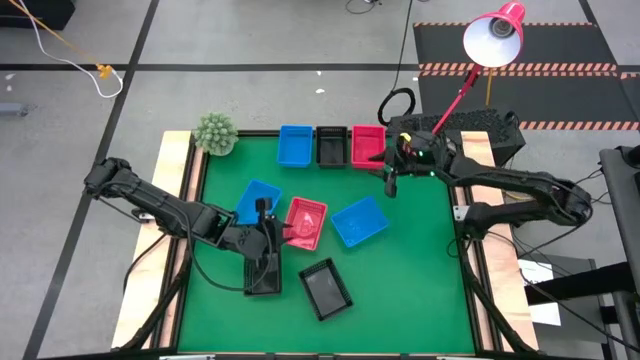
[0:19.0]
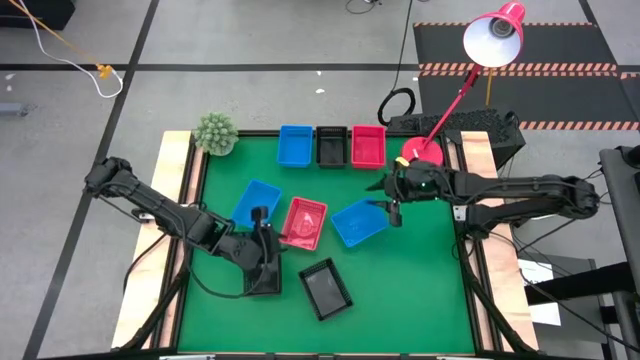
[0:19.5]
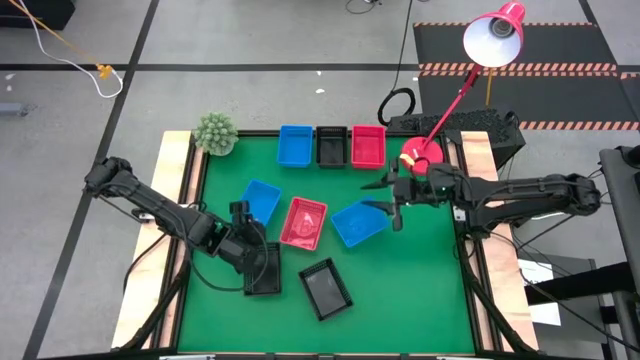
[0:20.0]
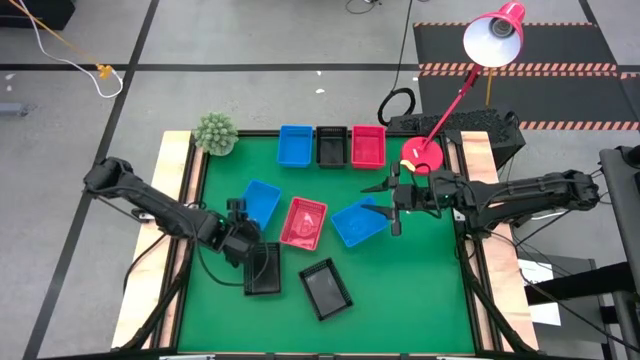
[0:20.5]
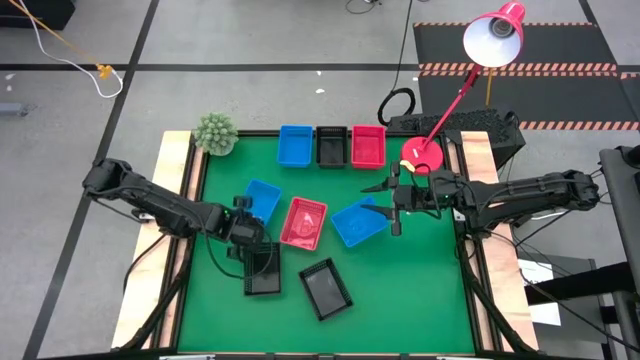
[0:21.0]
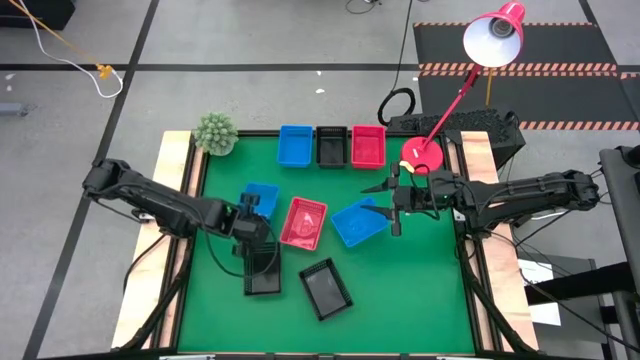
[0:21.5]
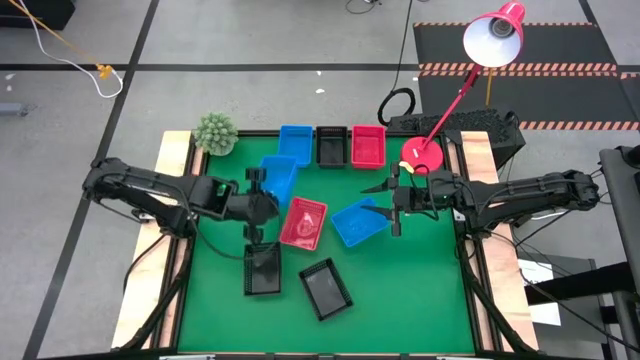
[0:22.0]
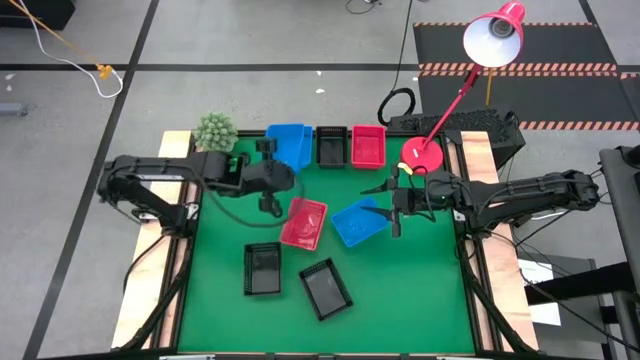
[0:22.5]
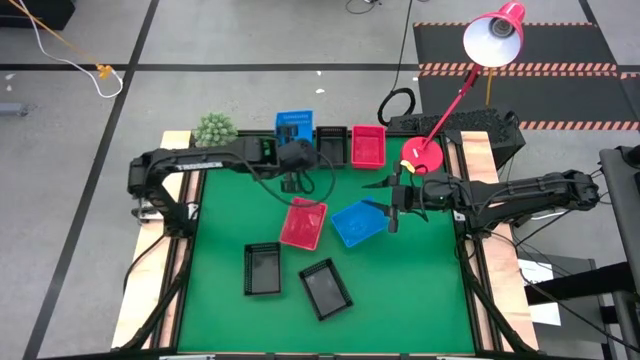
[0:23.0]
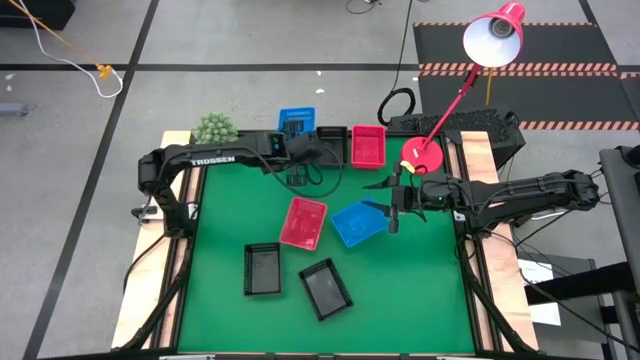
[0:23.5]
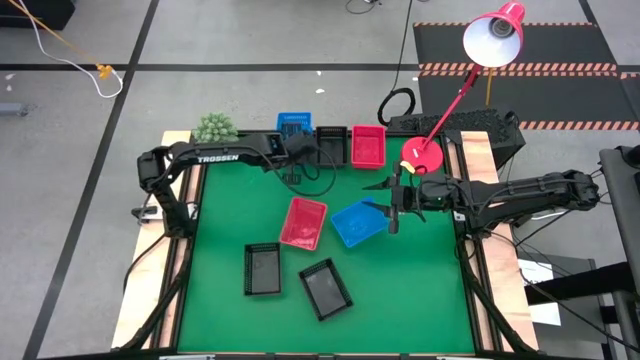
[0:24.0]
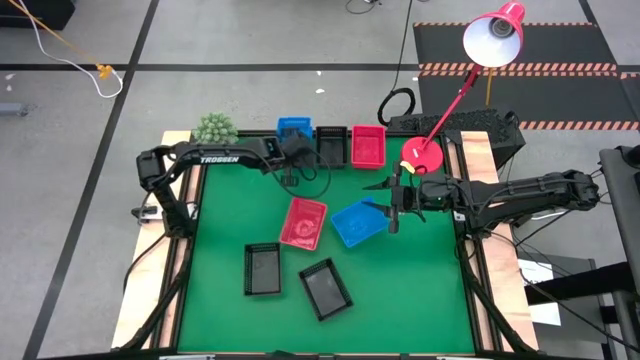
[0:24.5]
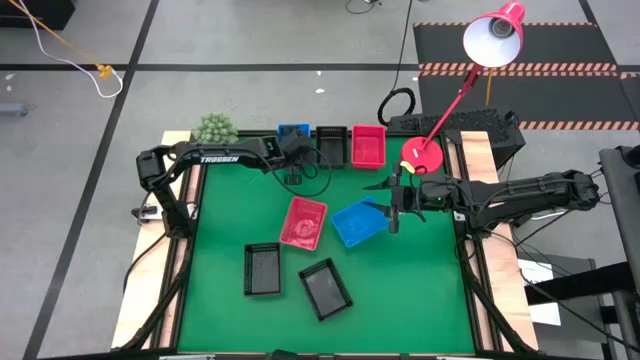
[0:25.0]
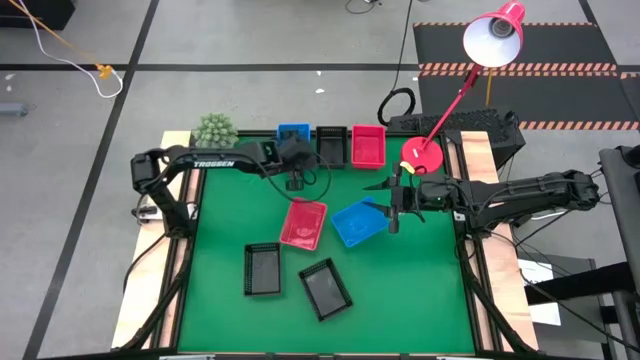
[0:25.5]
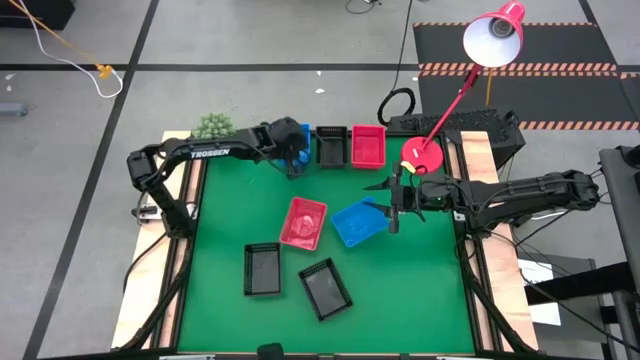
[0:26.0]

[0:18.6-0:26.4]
Stack the bottom left blue basket on the top blue basket

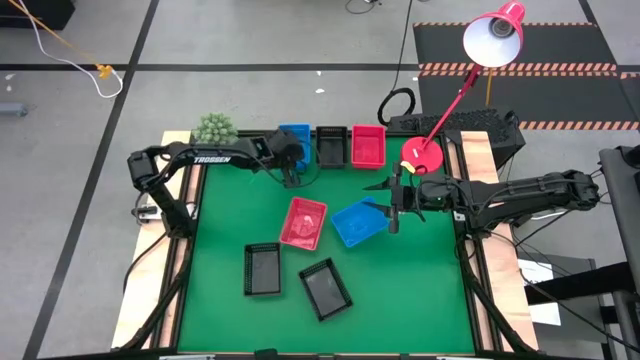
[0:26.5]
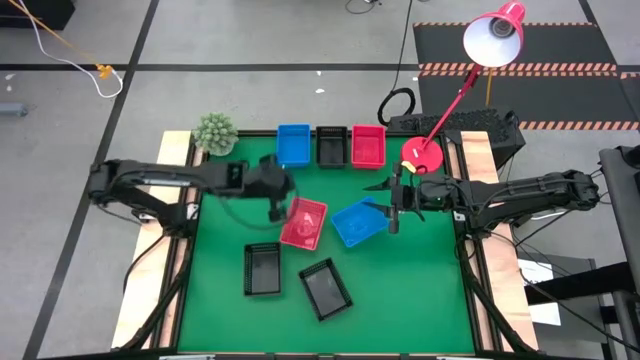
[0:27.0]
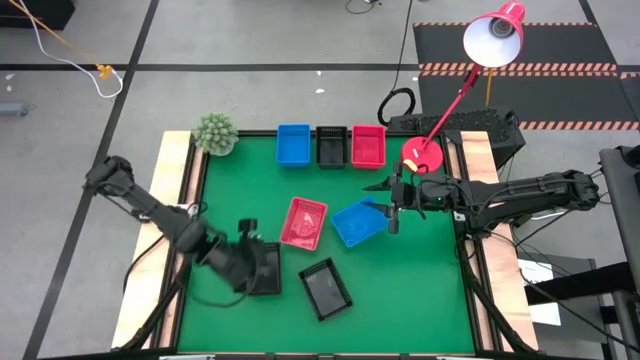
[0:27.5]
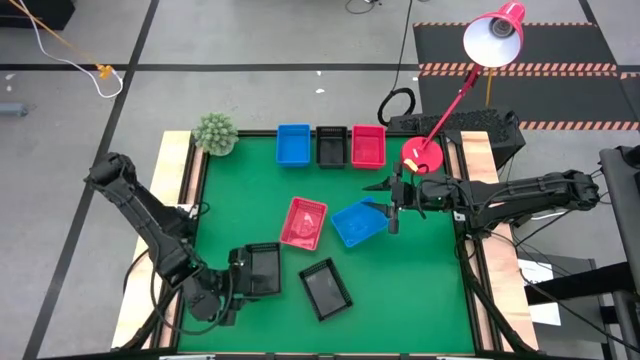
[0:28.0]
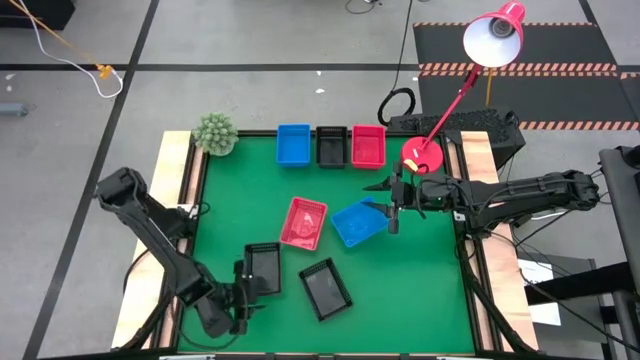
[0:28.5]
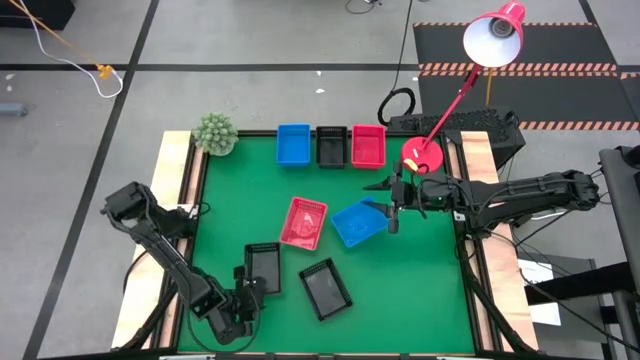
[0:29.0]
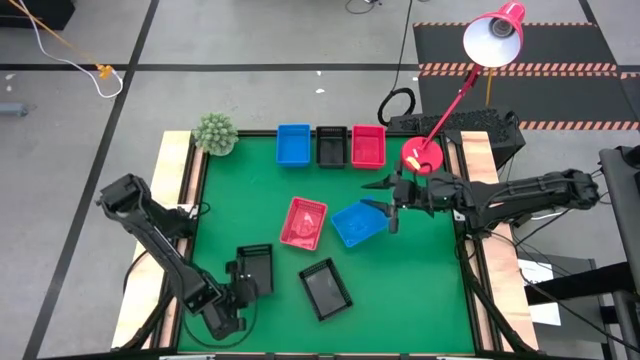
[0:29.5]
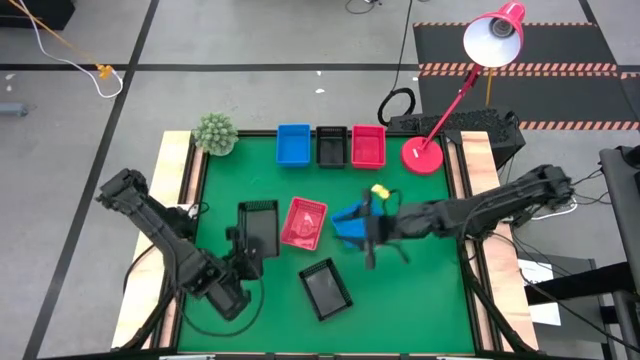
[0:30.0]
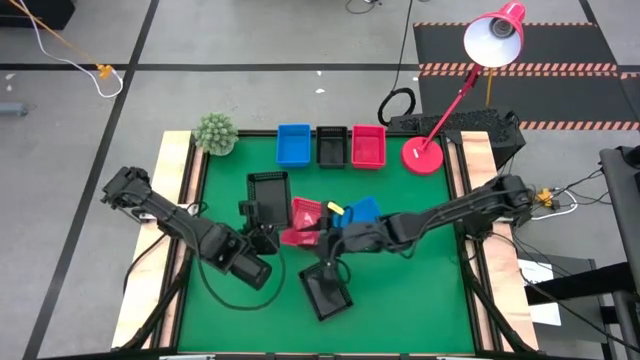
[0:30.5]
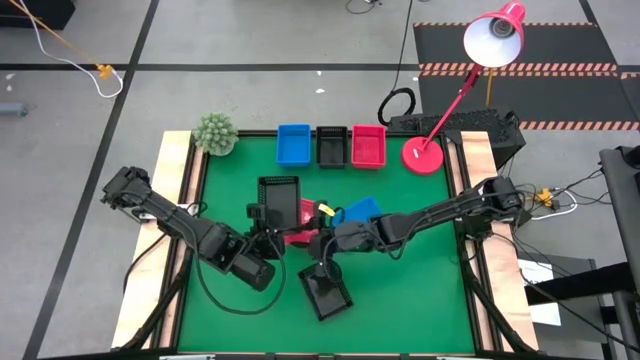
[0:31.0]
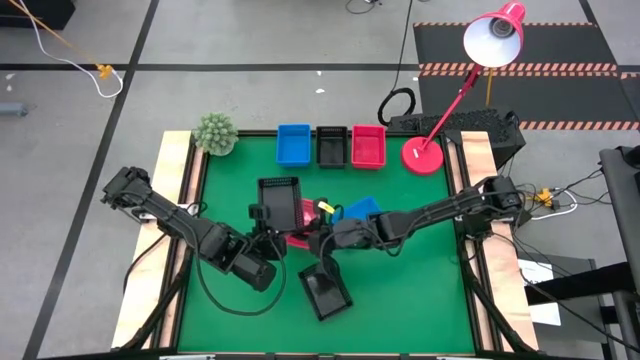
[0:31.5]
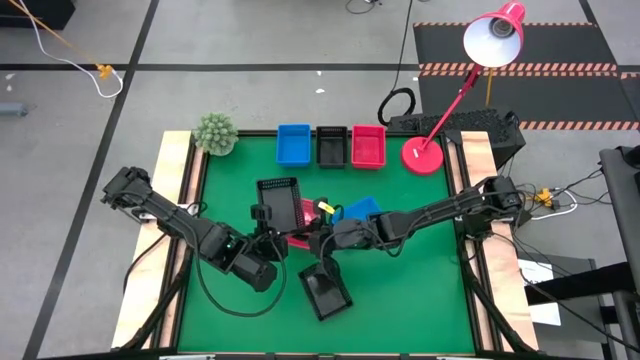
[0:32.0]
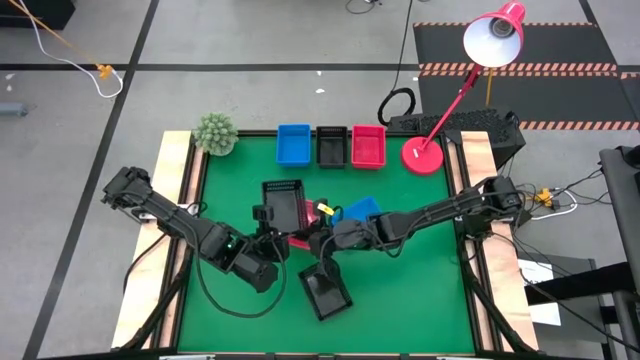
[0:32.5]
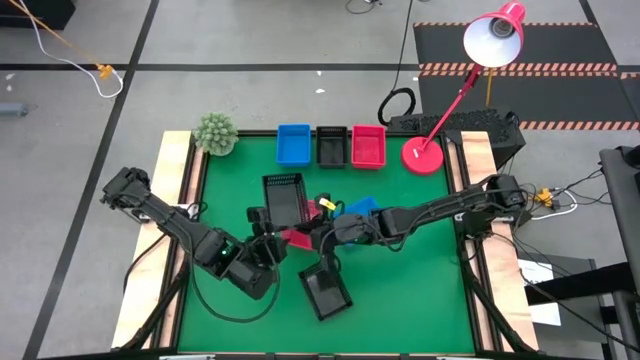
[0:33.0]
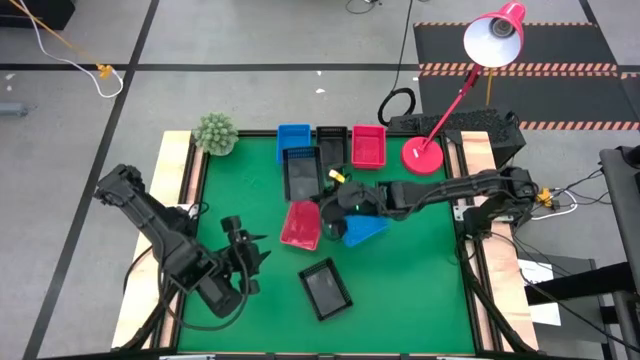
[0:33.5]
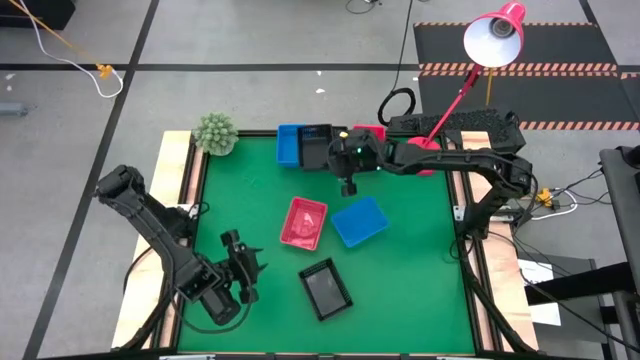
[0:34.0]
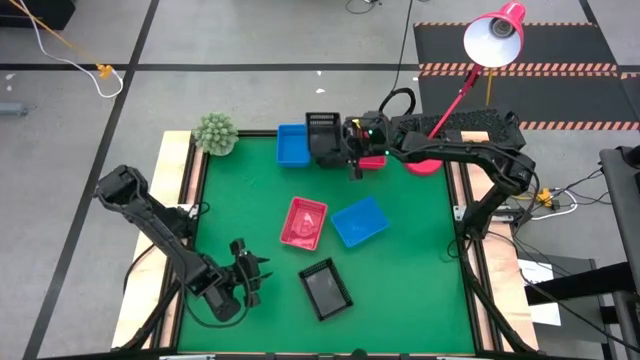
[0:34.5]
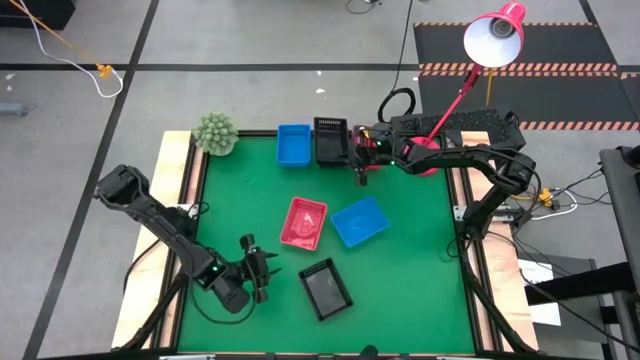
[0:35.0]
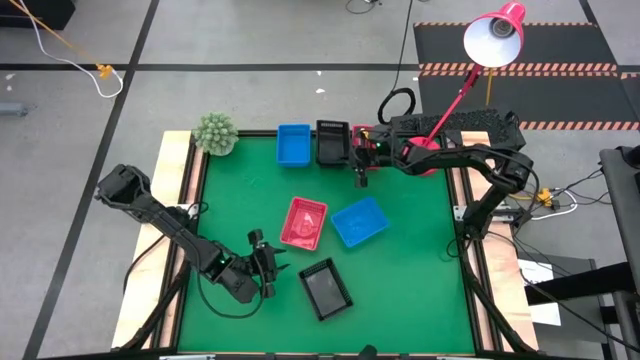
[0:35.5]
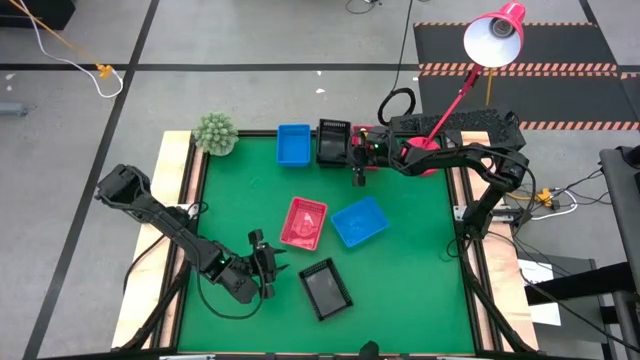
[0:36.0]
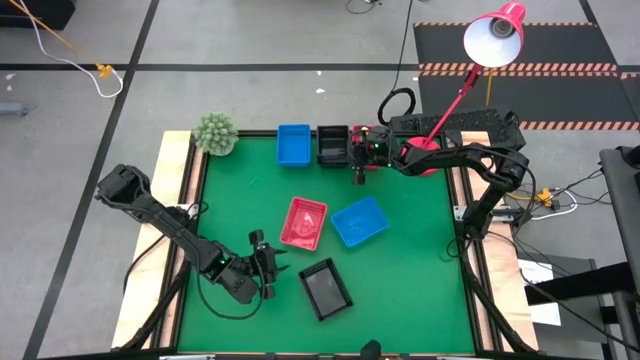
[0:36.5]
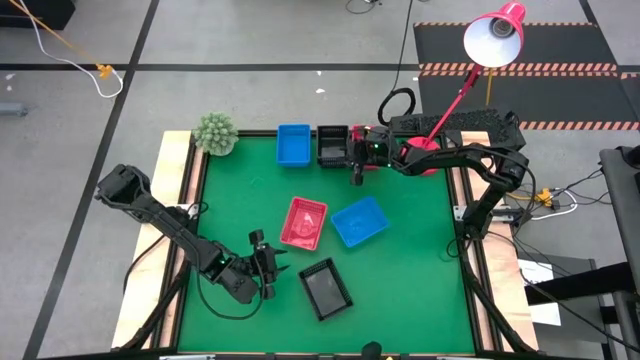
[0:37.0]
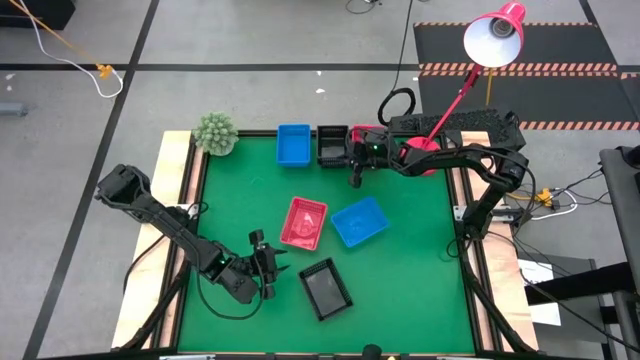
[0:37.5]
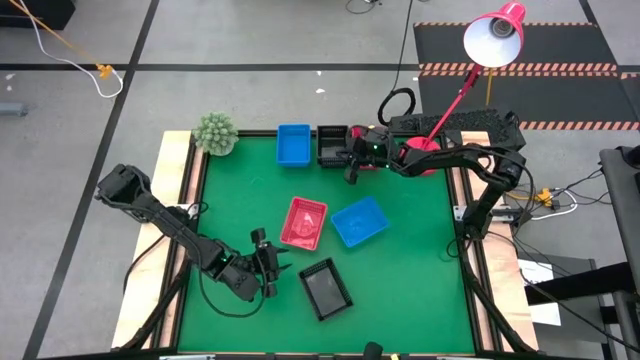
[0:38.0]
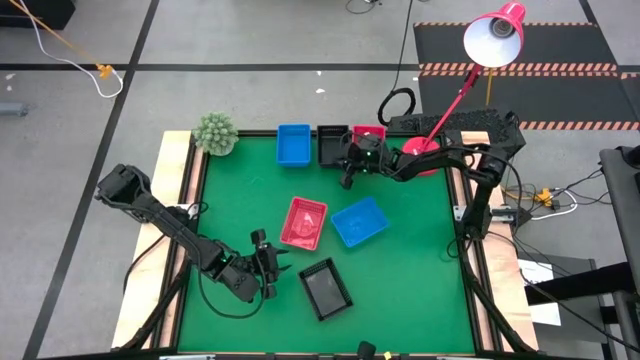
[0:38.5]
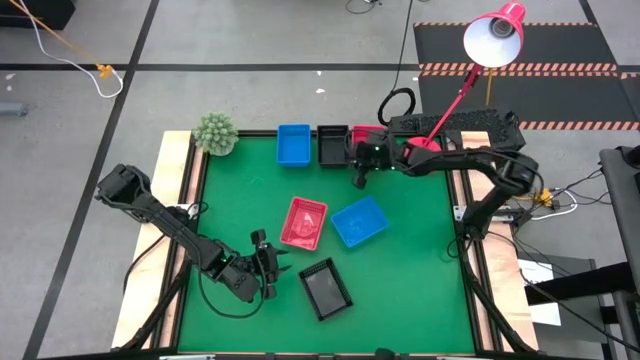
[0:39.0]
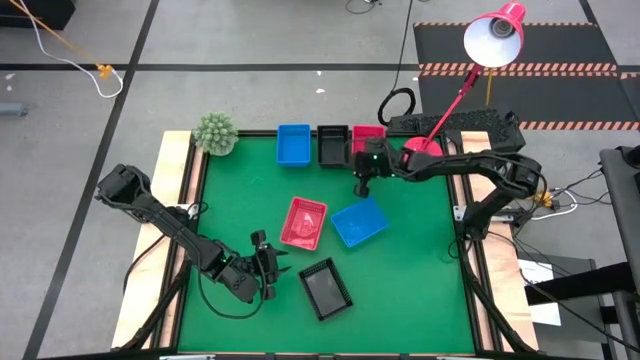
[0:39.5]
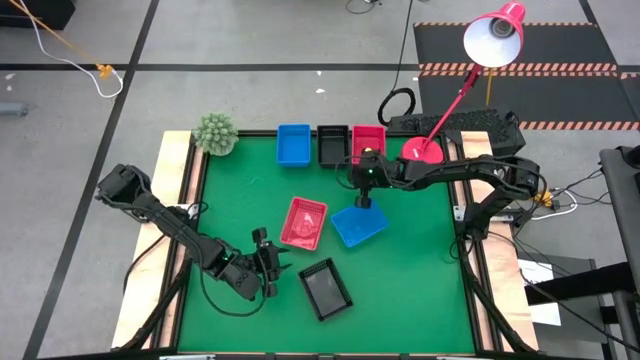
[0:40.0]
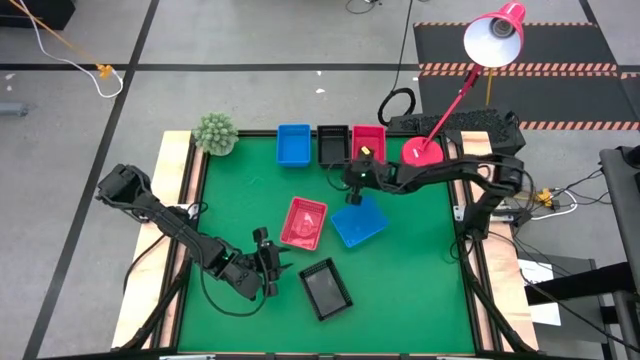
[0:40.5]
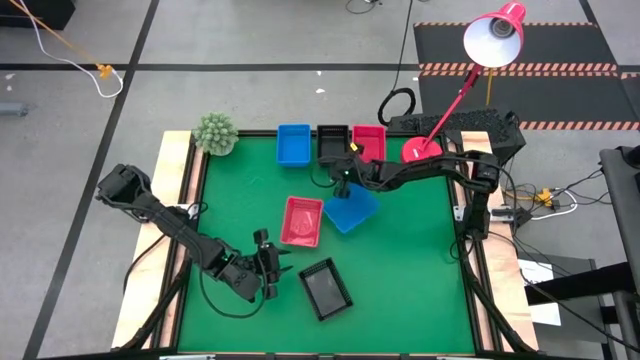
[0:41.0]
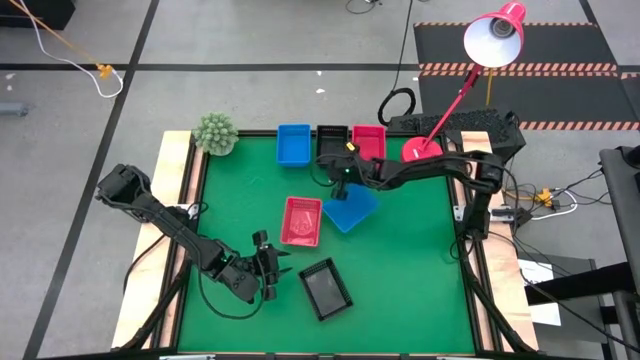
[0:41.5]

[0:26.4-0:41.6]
Stack the bottom left black basket on the top black basket
